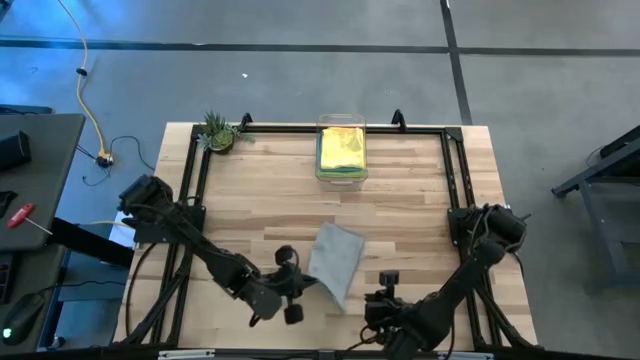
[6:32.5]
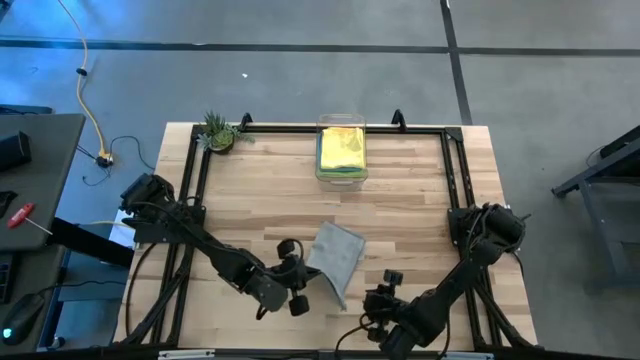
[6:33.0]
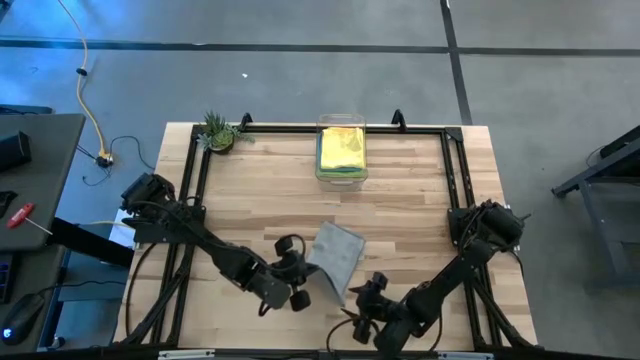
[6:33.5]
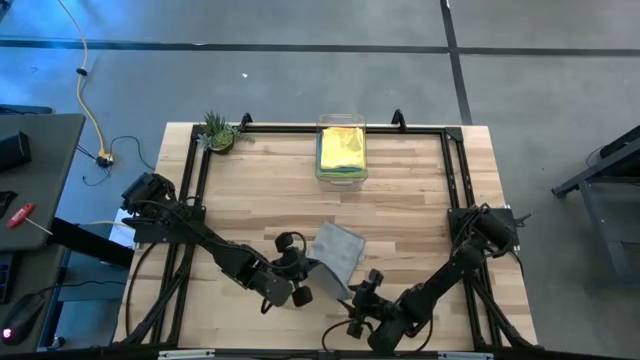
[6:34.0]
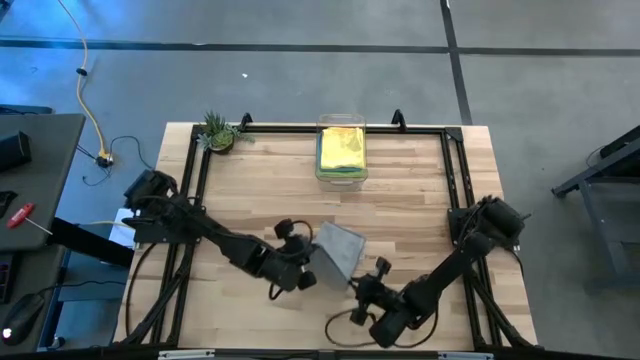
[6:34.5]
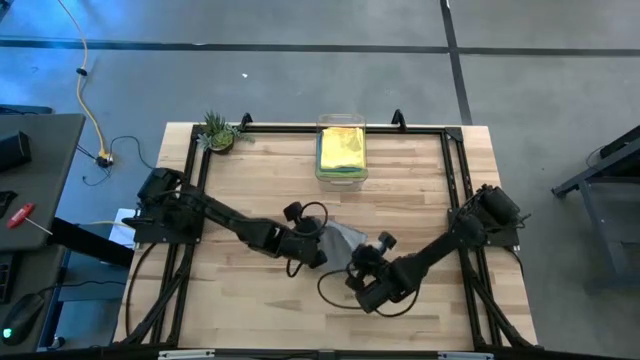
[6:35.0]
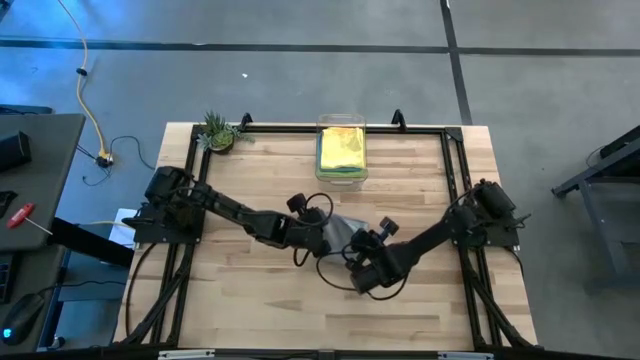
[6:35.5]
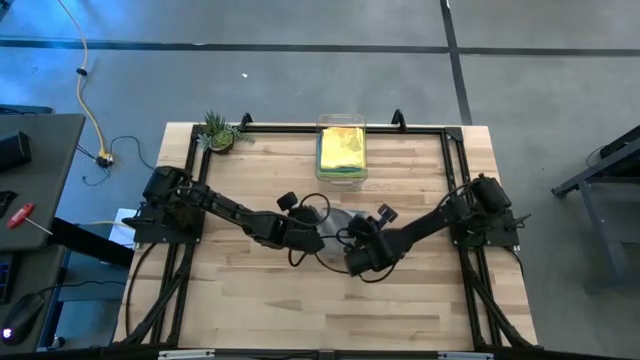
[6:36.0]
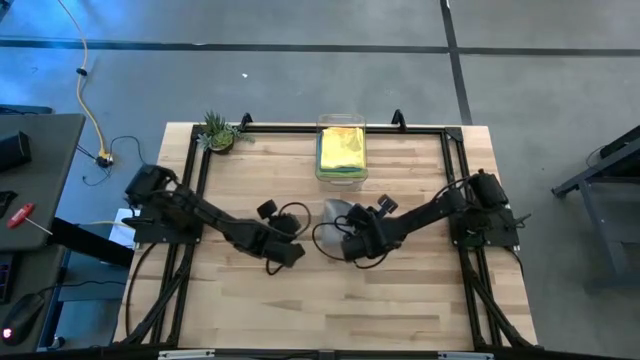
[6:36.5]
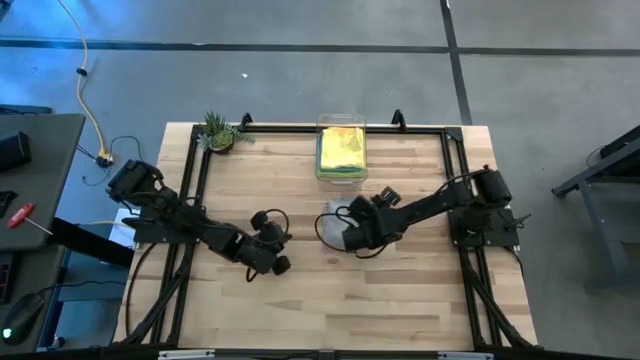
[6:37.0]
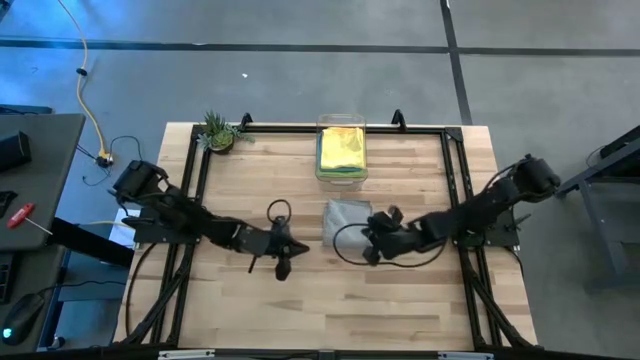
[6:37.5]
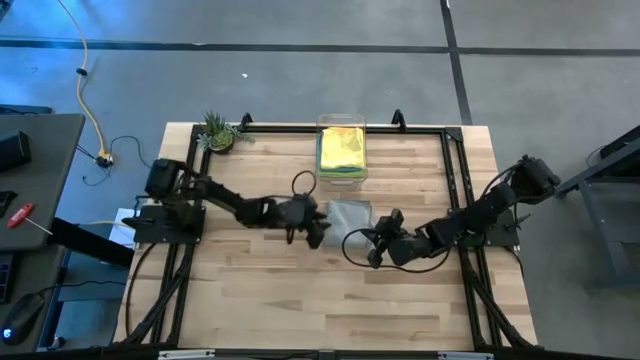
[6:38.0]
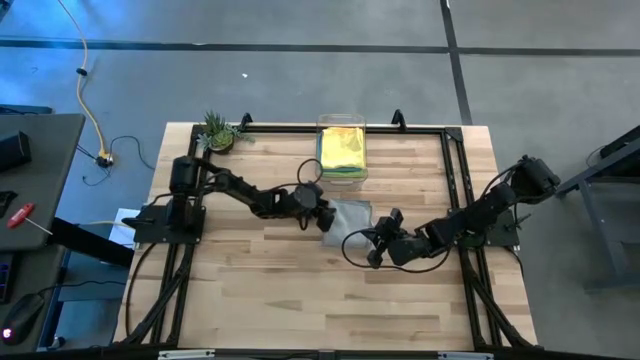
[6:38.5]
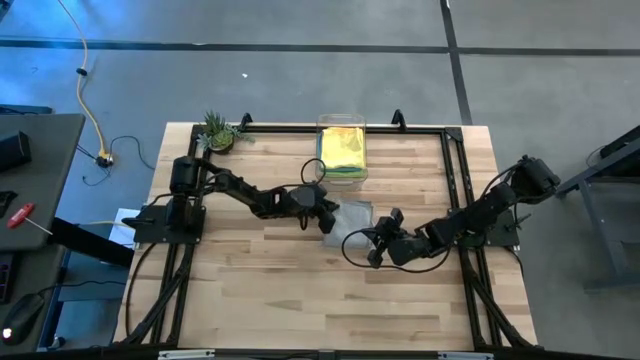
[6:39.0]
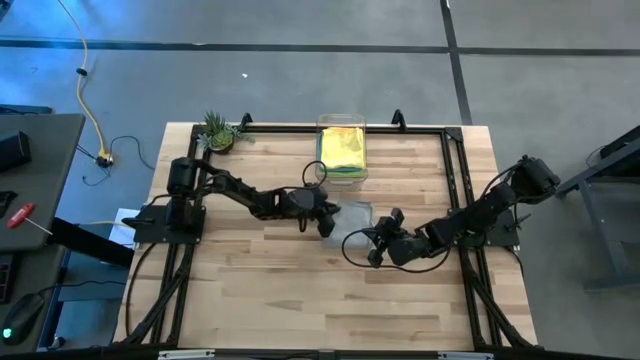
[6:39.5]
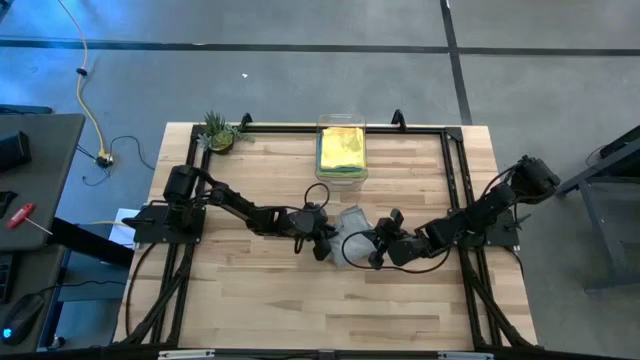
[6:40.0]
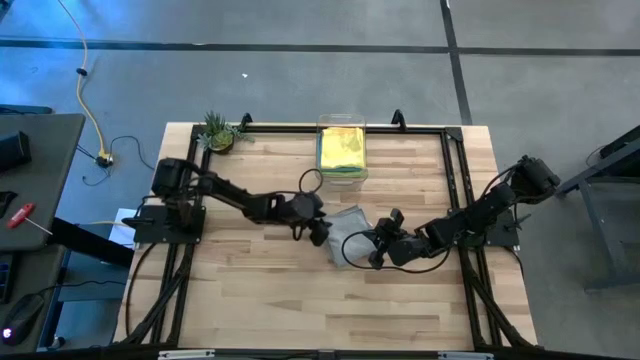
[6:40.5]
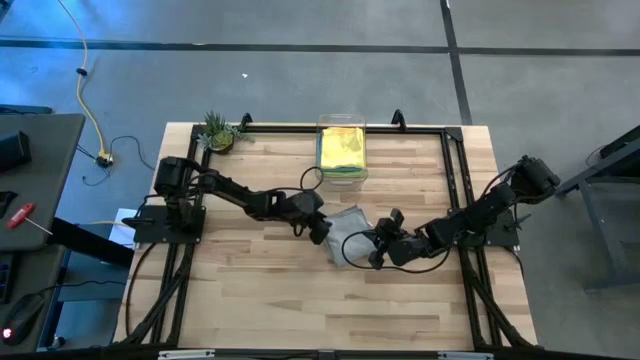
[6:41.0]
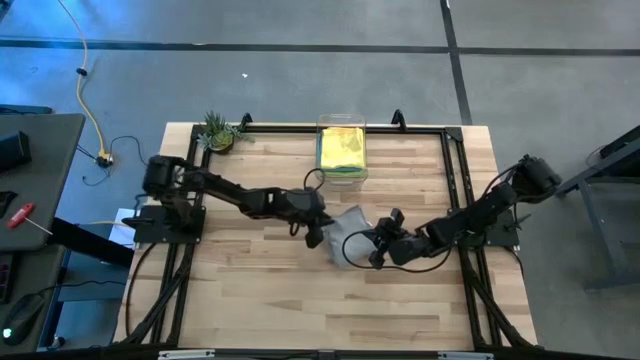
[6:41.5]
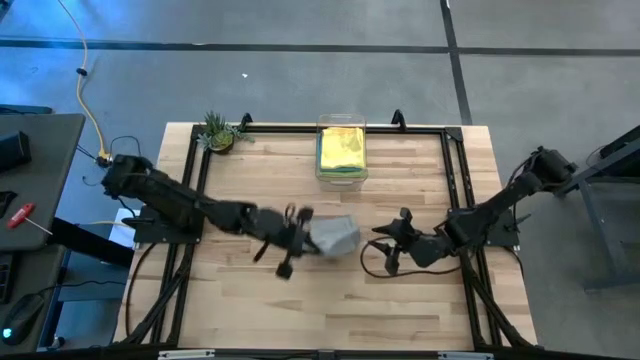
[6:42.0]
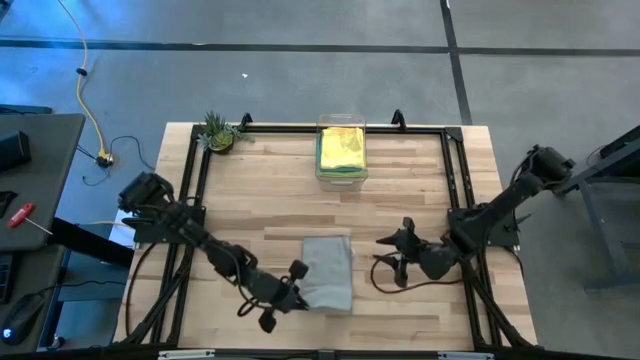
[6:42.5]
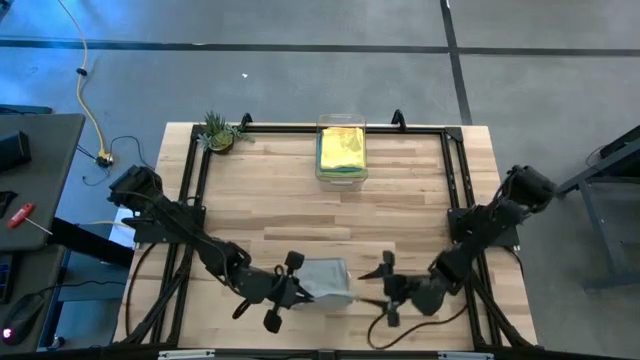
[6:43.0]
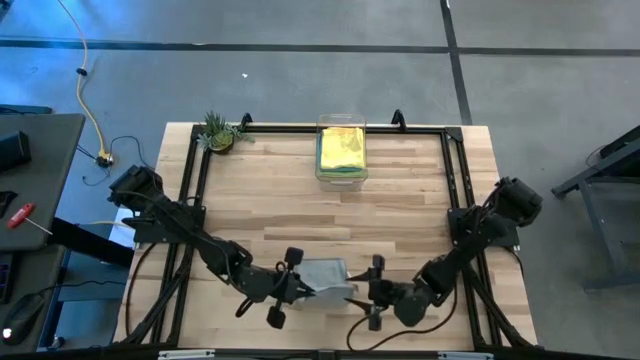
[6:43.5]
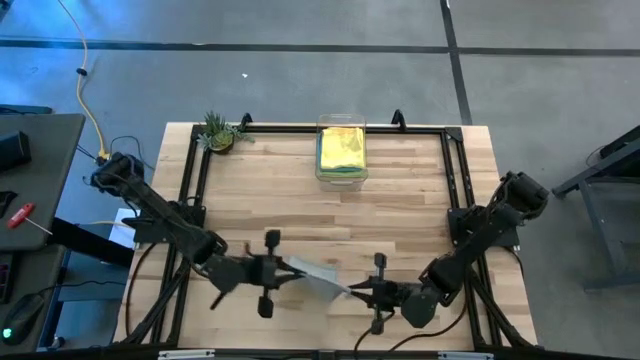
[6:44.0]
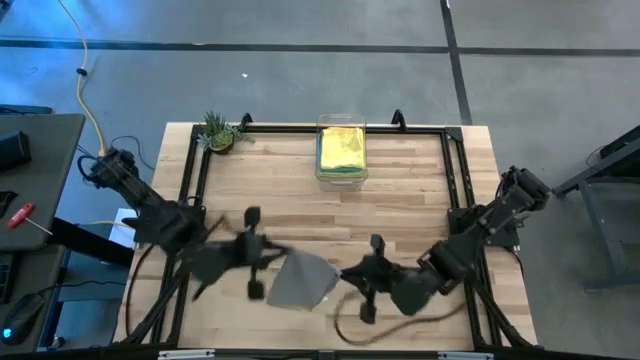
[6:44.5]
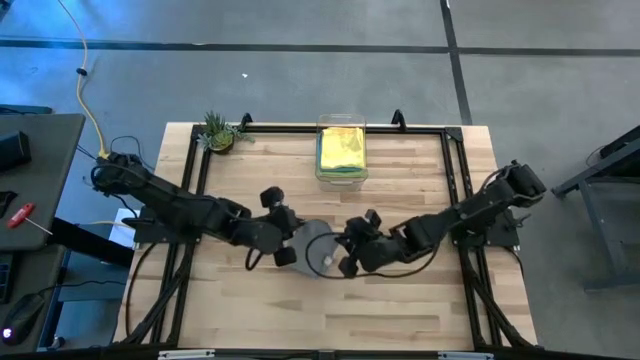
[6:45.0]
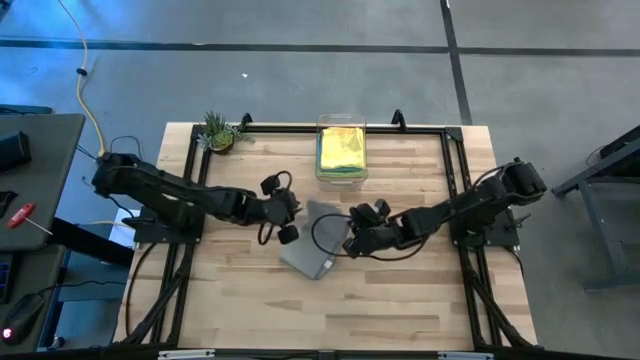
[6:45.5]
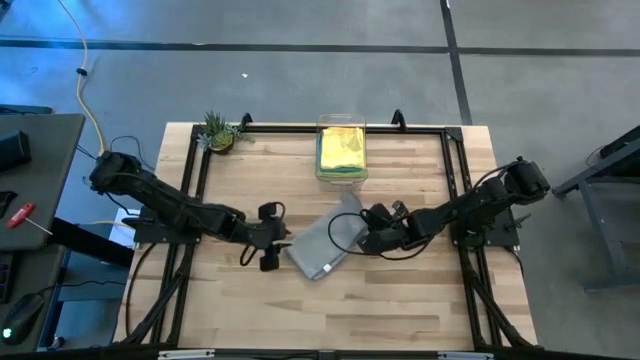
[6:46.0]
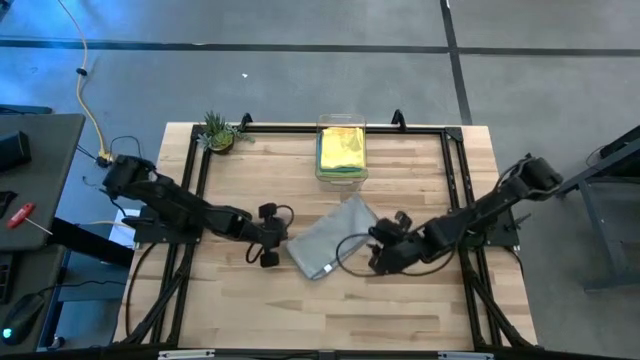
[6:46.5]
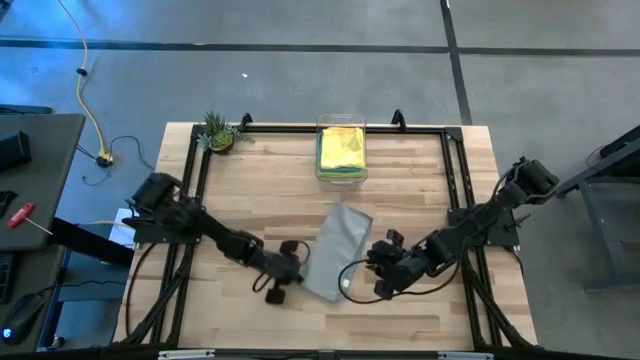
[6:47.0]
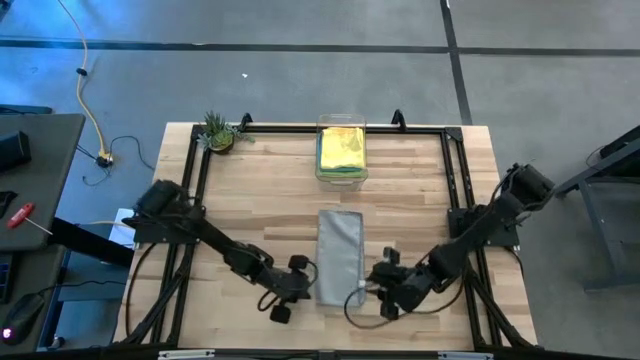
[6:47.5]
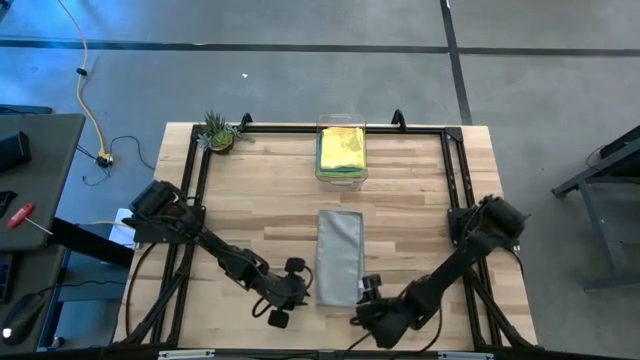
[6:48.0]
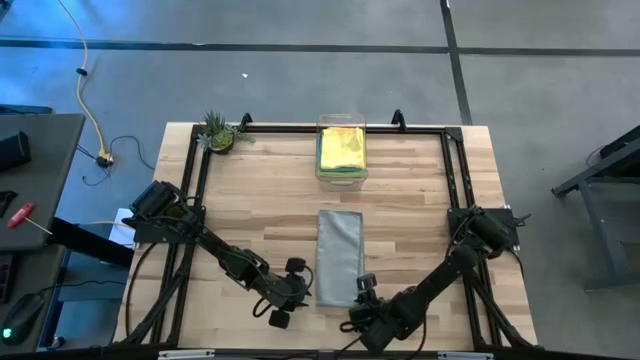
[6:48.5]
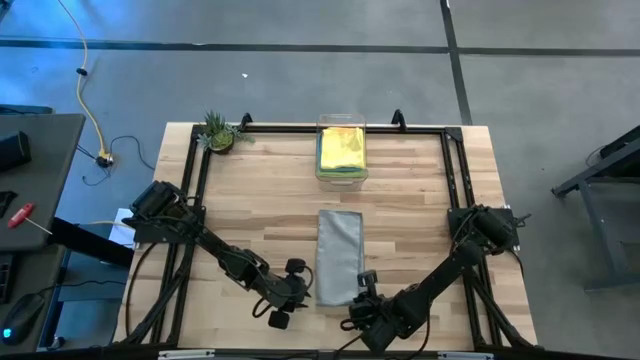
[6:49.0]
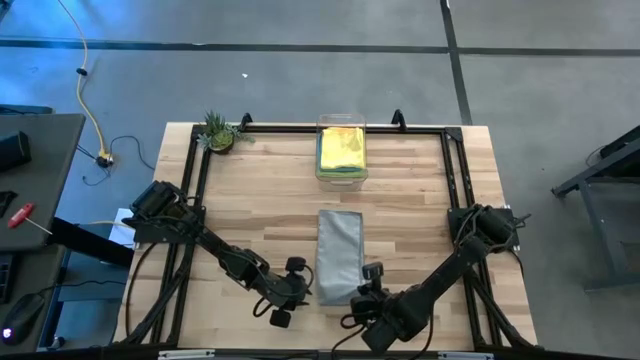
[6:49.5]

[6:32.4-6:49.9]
Task: Fold microfiber towels
Fold the gray microfiber cloth

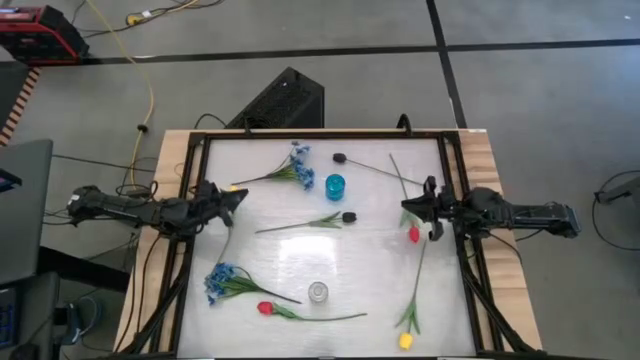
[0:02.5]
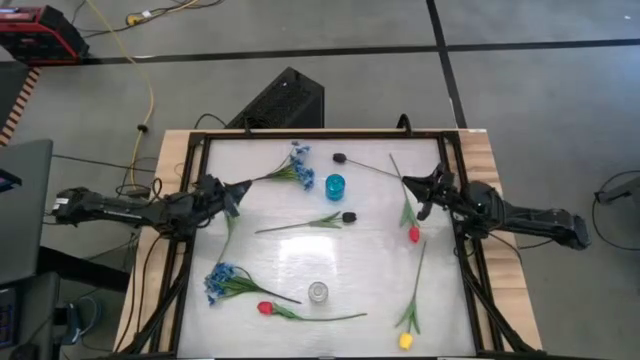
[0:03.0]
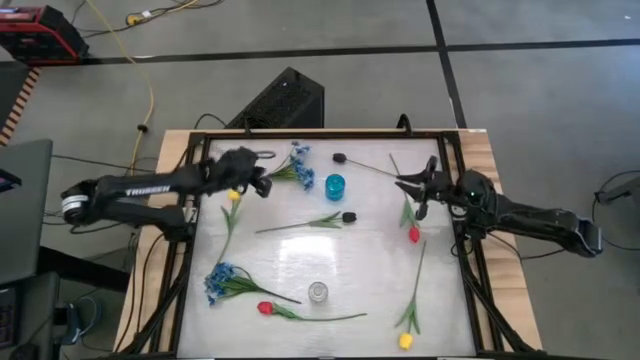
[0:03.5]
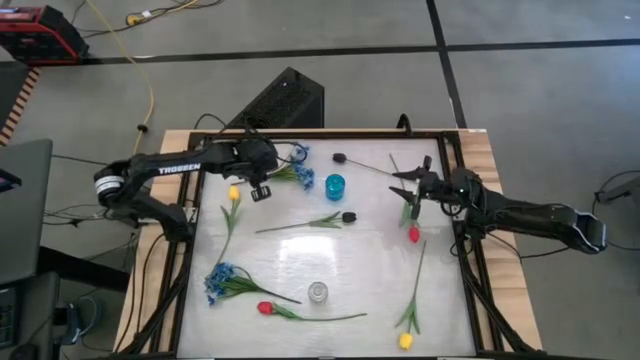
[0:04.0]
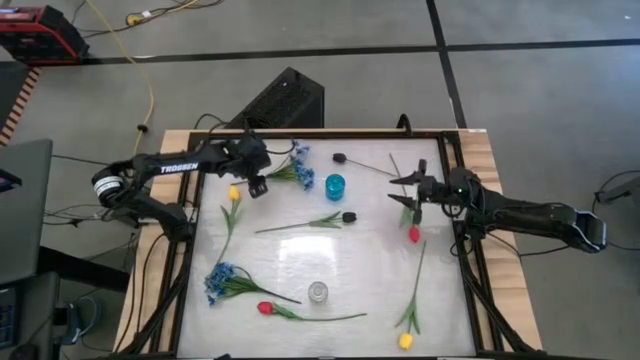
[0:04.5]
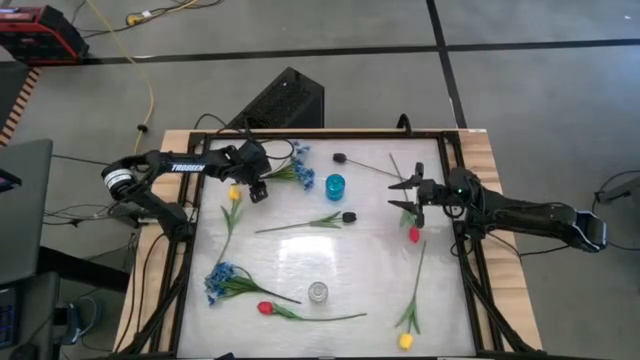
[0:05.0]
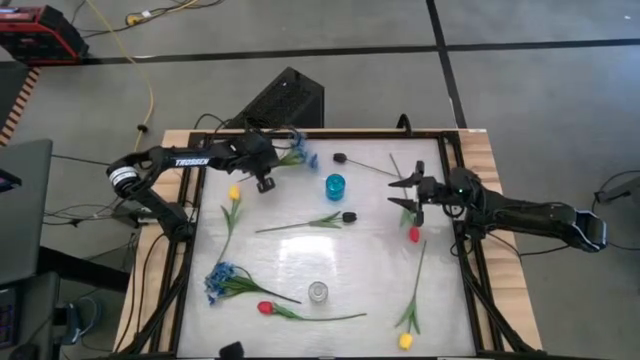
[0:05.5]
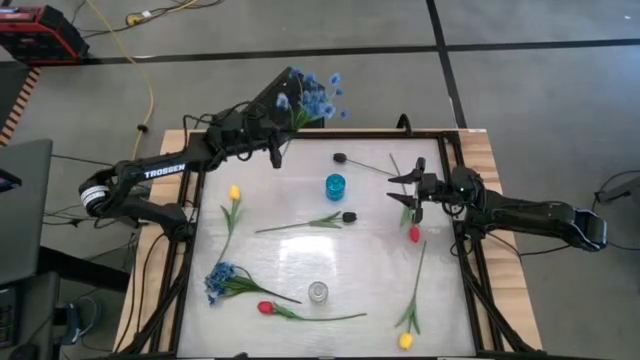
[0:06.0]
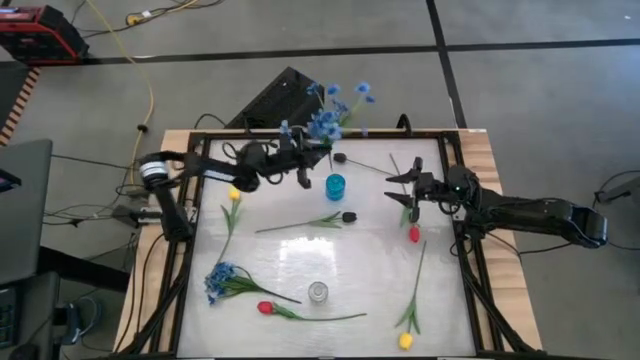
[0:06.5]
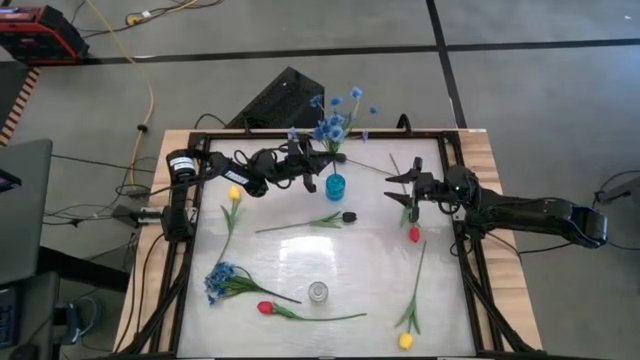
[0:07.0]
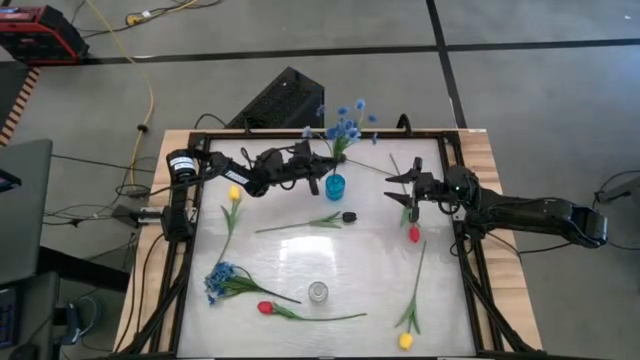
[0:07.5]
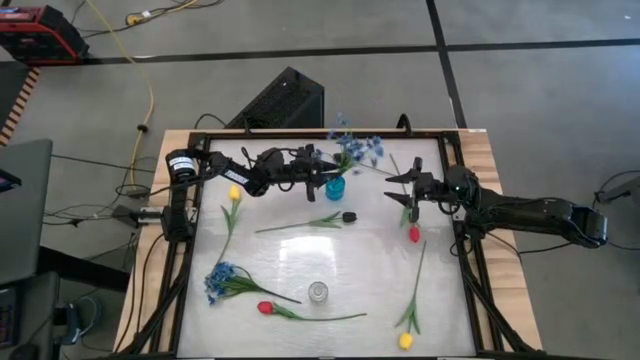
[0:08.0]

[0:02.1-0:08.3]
Task: Sort flowers into vase by color
Put the top blue flowers into the blue vase
